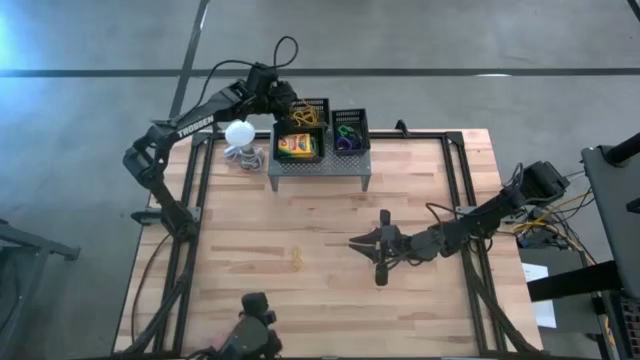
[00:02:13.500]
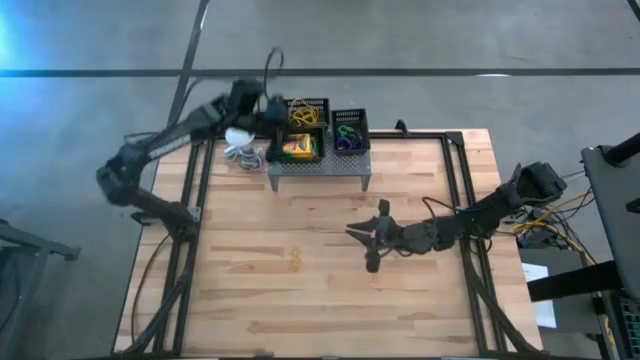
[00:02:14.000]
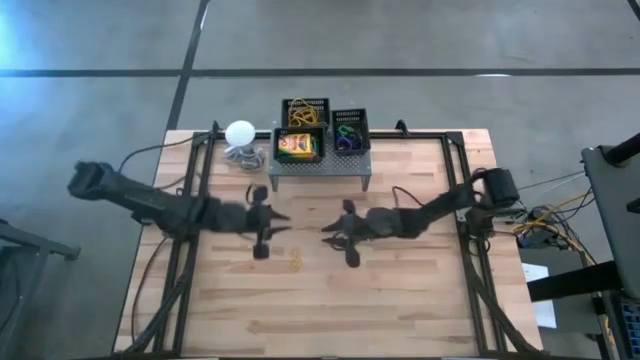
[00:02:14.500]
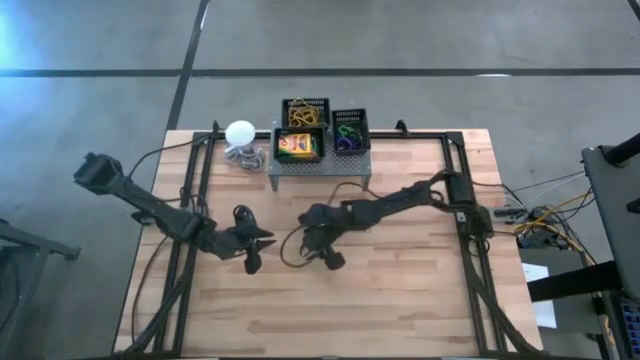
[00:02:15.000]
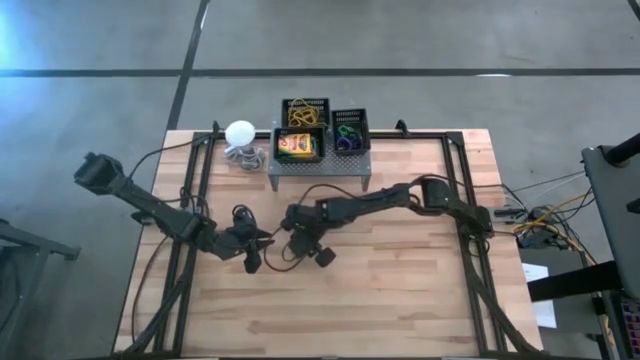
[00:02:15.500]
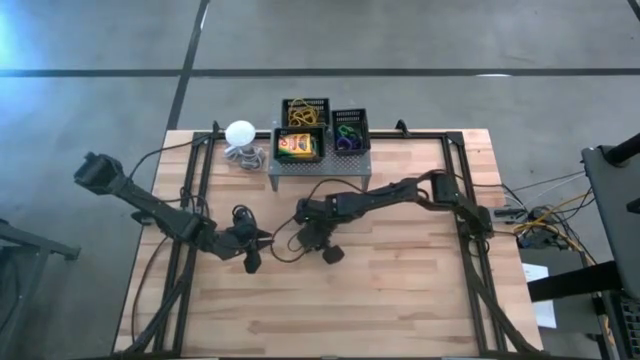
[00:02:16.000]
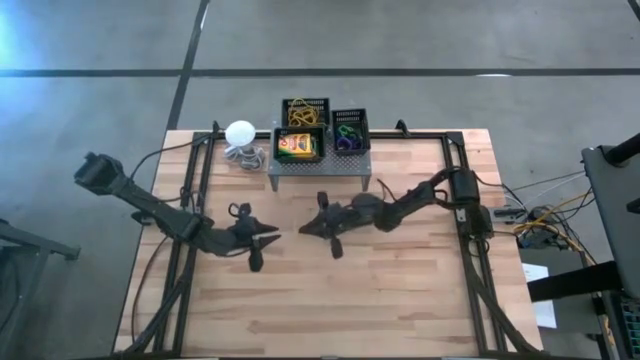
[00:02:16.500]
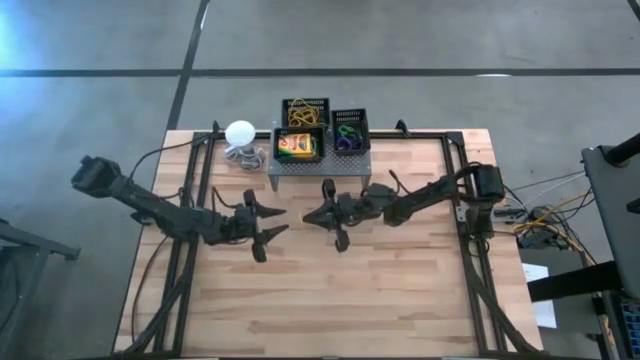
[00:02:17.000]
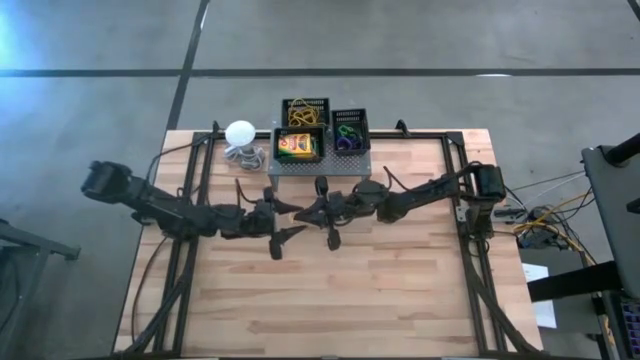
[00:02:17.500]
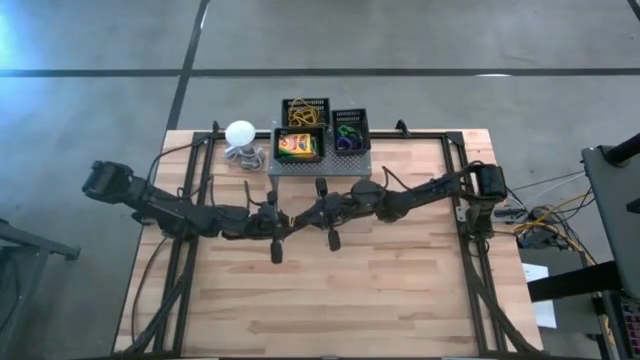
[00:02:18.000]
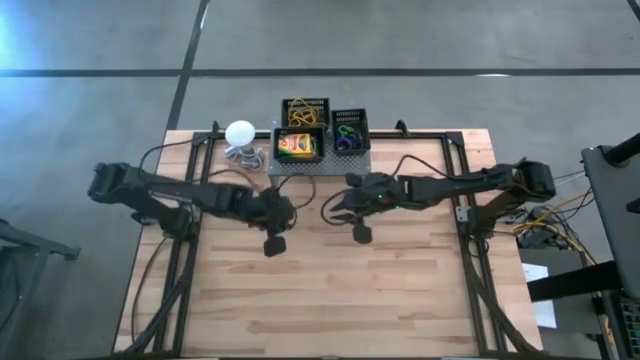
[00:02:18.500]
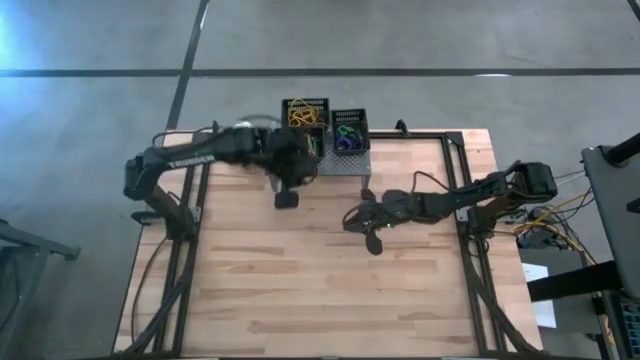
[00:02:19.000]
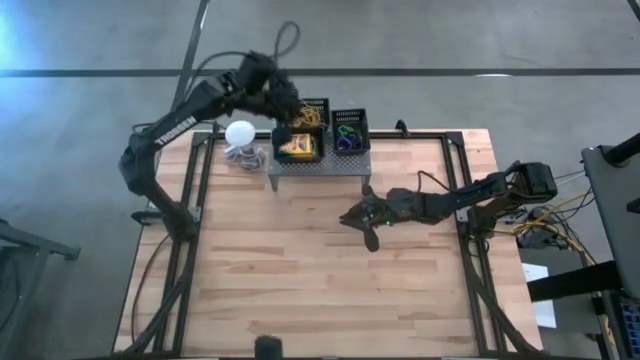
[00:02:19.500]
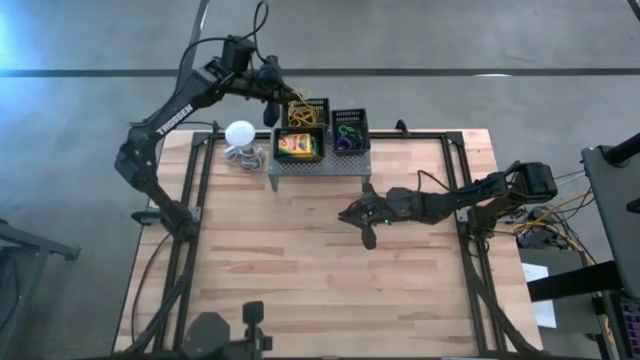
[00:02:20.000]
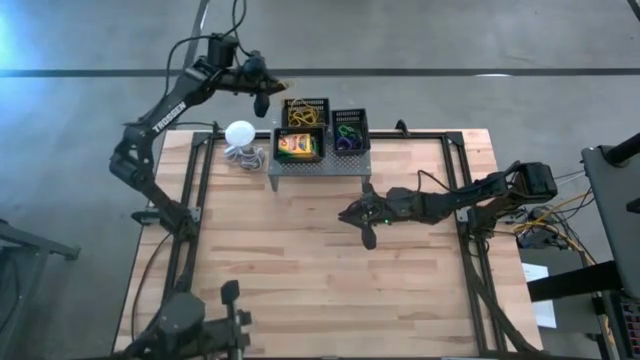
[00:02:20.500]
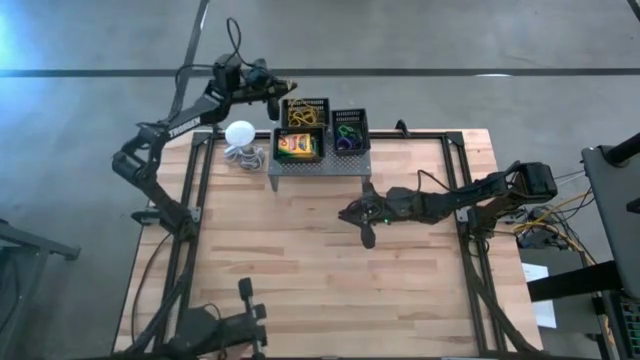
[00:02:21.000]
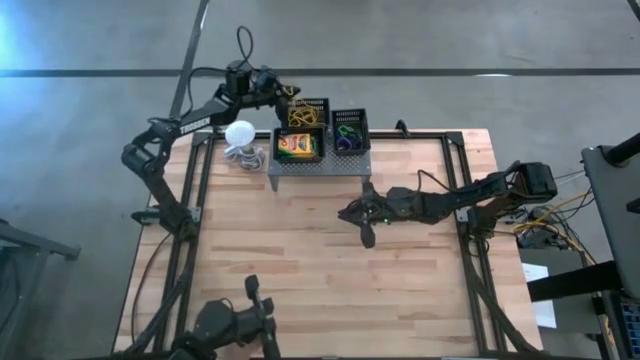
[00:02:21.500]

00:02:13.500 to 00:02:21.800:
Task: Pick & Place Office Desk Supplies
Put the yellow rubber band into the top left black bin on the shelf

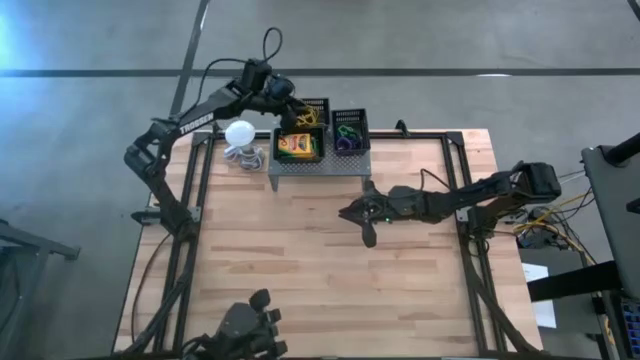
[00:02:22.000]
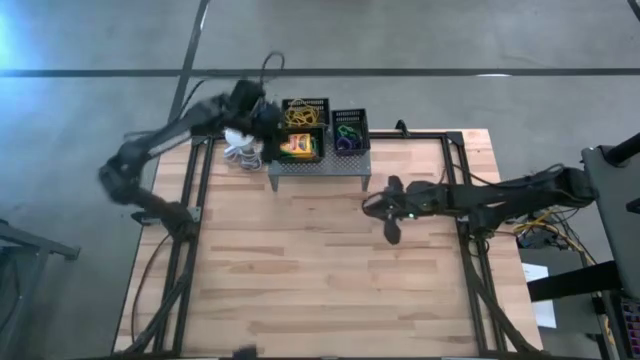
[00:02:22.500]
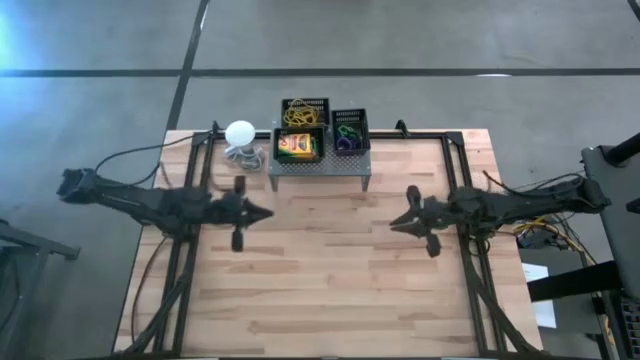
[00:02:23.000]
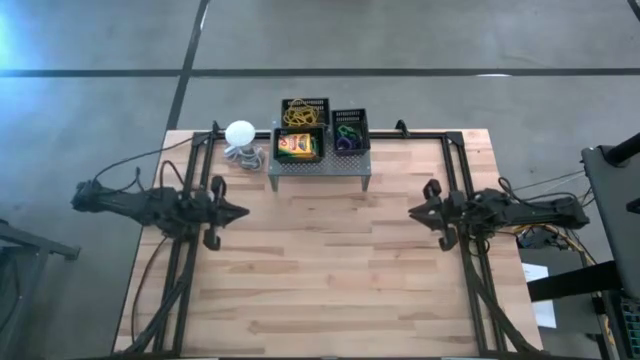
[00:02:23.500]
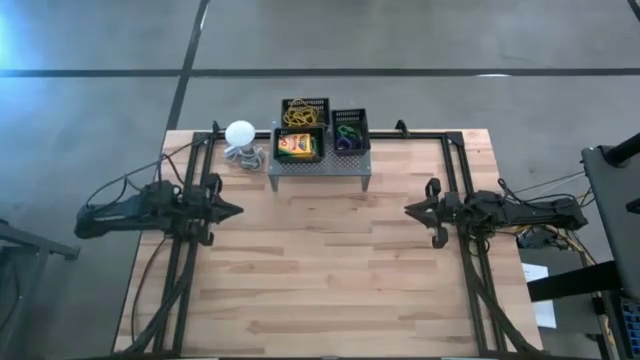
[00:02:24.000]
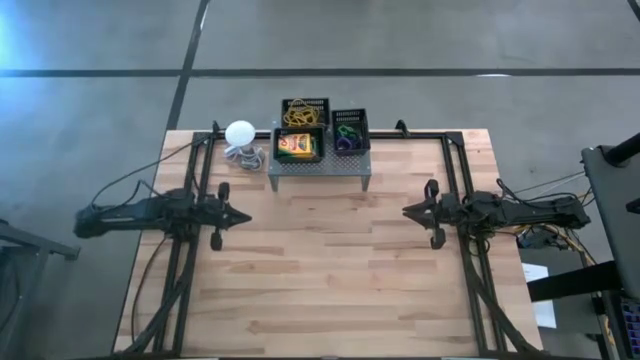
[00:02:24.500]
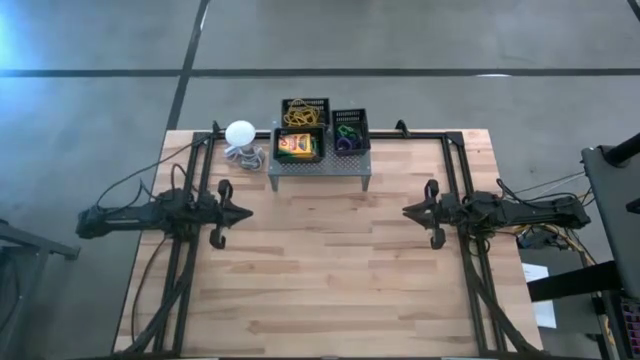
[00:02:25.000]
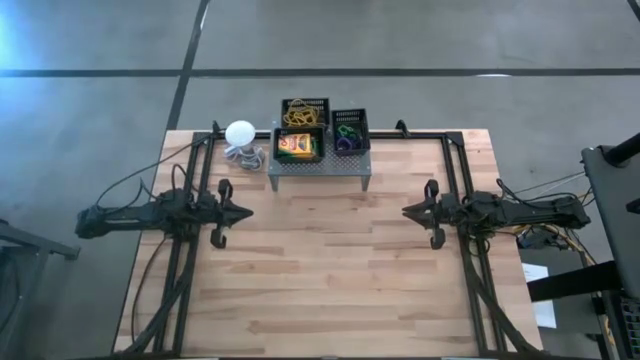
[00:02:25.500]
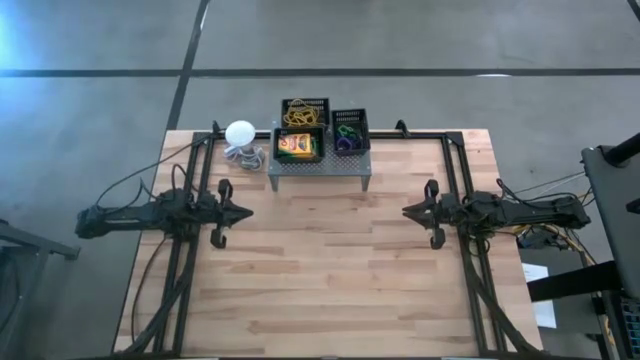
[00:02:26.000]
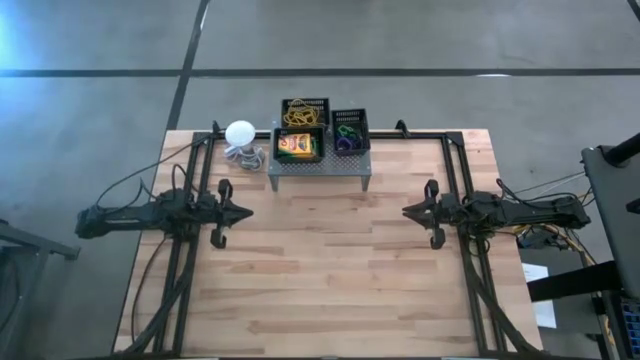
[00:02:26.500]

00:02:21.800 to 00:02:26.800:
Return to Home Position

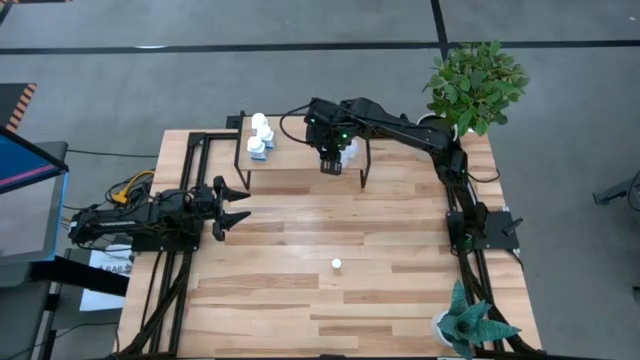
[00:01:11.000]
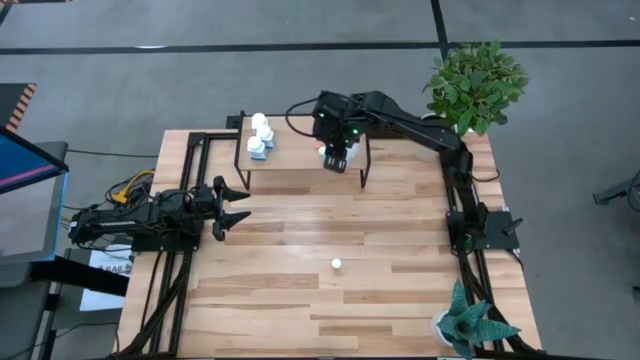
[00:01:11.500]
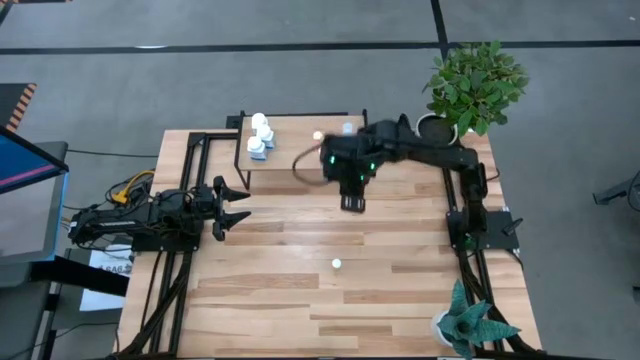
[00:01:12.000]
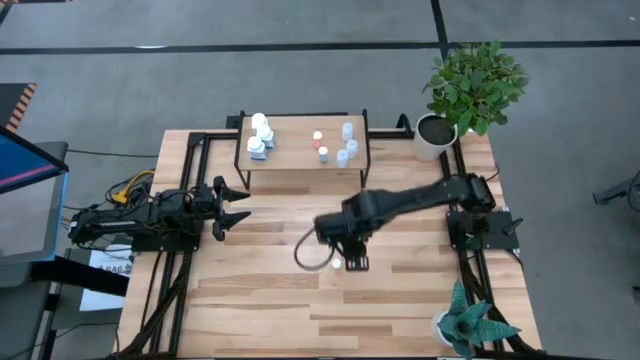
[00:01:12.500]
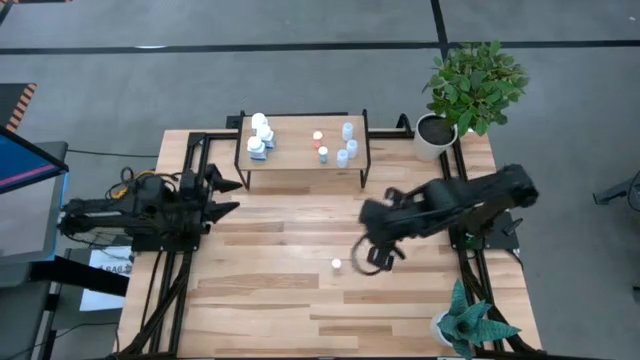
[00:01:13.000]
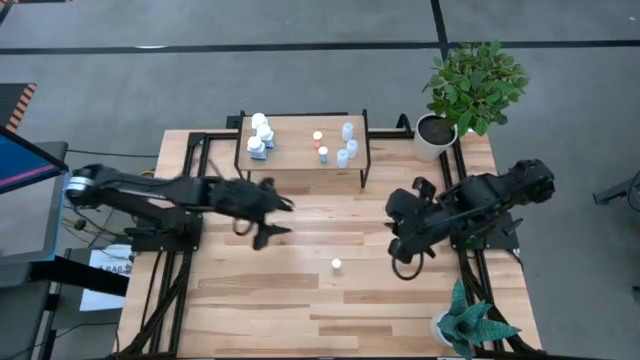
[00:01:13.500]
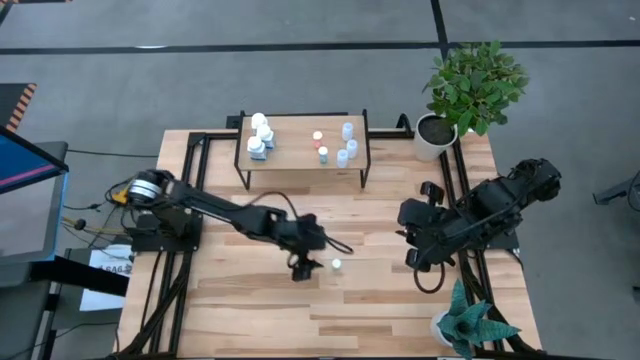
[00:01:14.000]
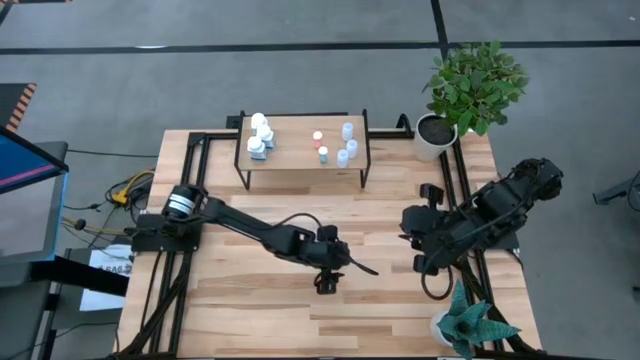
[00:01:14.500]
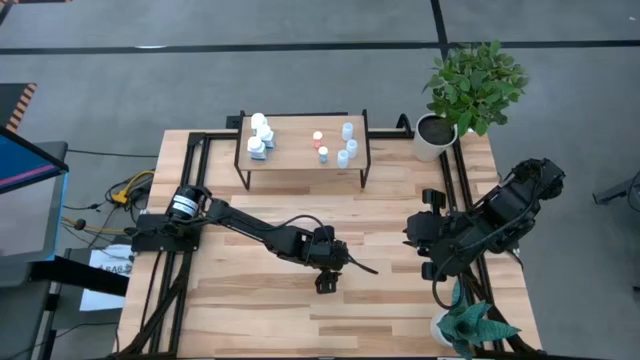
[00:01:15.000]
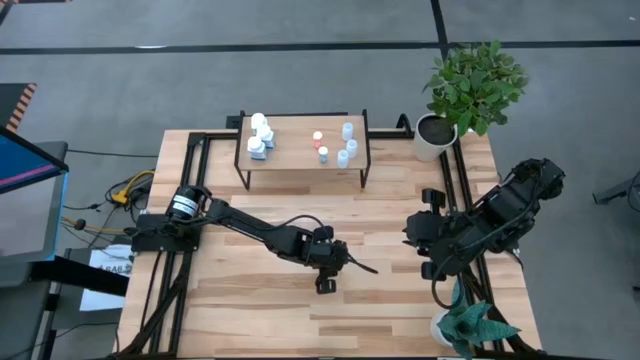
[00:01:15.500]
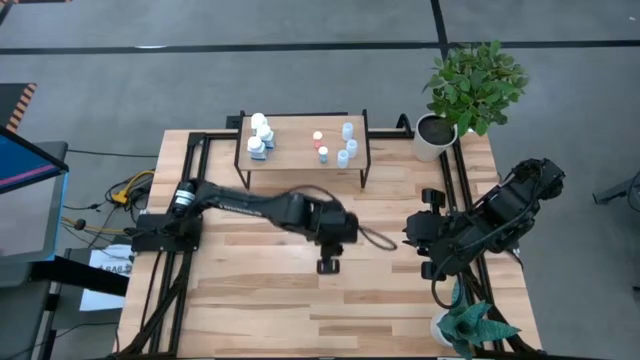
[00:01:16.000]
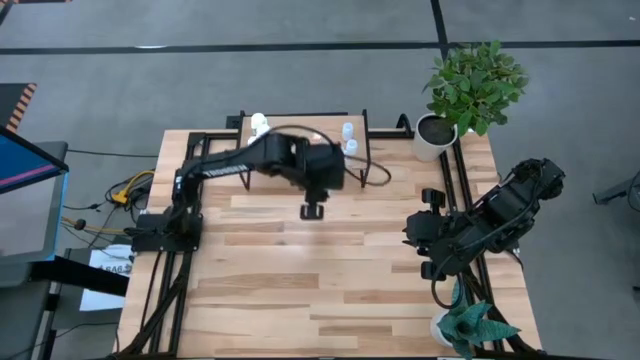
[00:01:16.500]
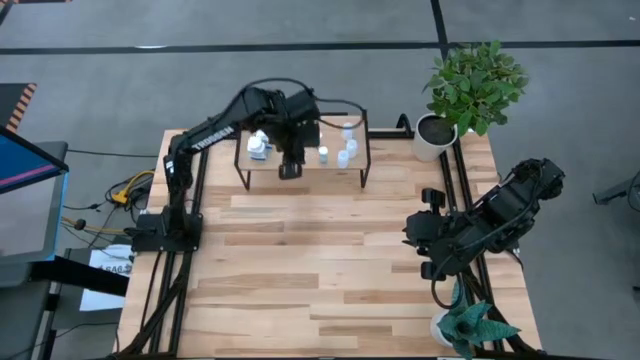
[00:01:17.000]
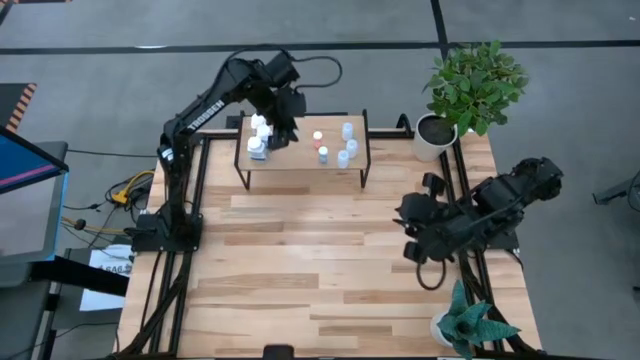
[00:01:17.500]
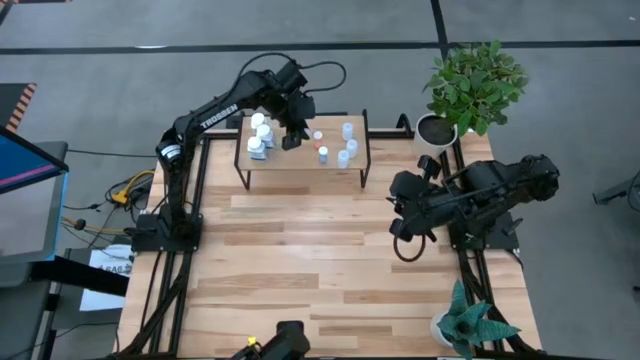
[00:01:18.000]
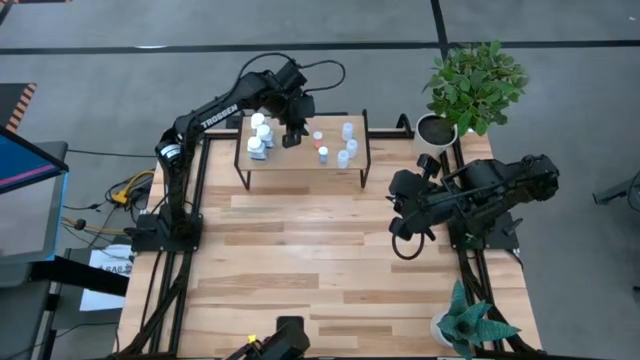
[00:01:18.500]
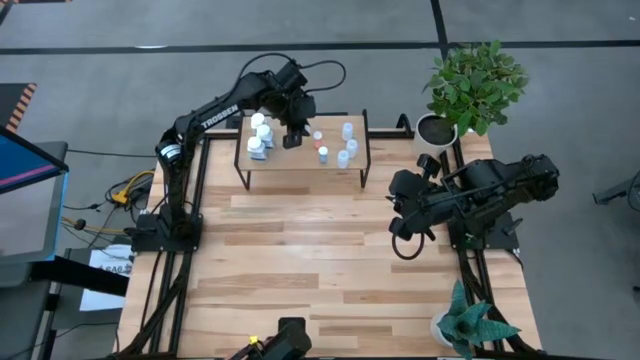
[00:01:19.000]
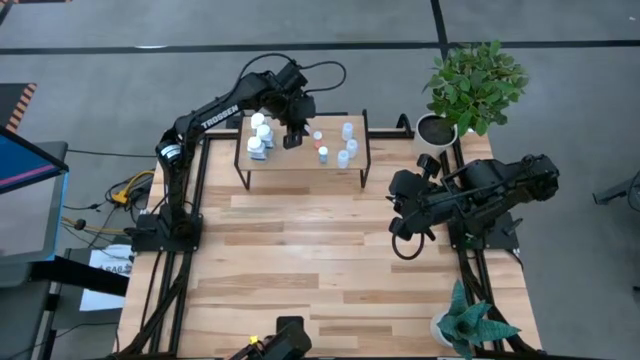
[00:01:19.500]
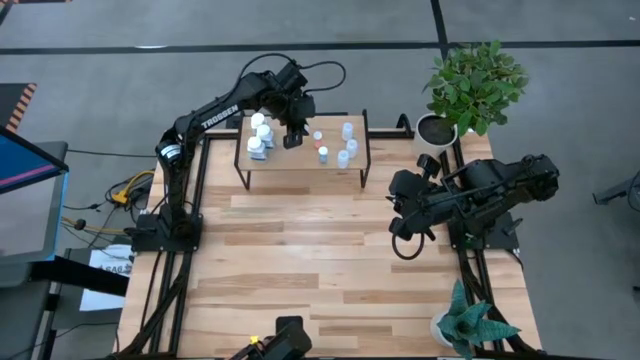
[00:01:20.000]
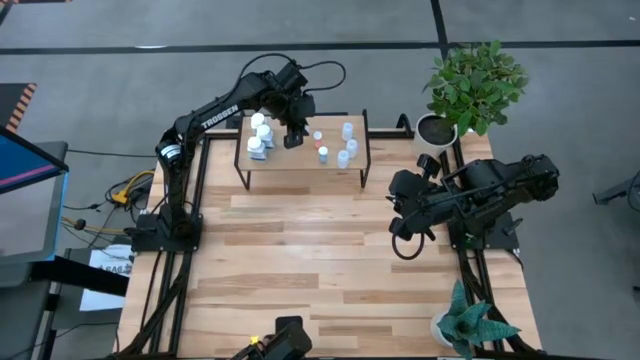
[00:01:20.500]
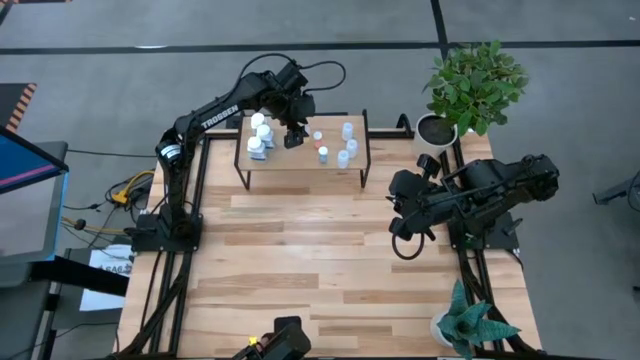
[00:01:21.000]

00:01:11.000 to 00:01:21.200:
Task: Pick and place medicine bottles onto shelf by color
Put the yellow medicine bottle on the shelf
